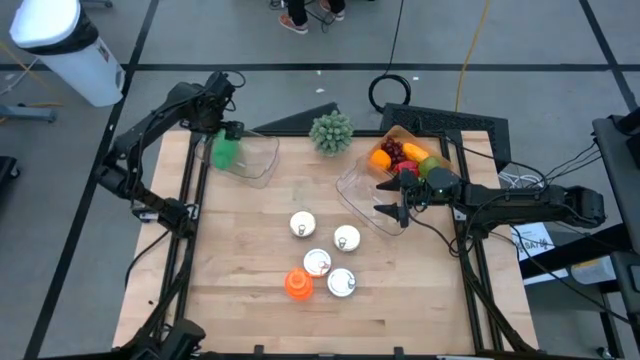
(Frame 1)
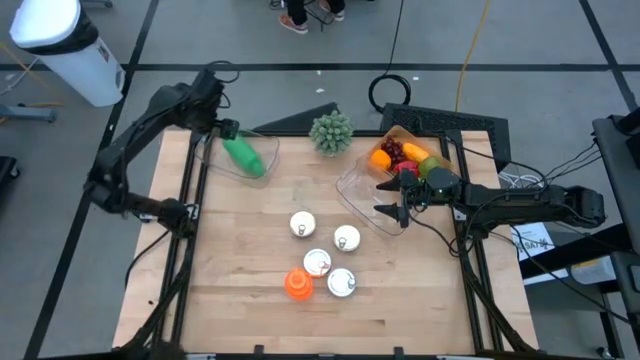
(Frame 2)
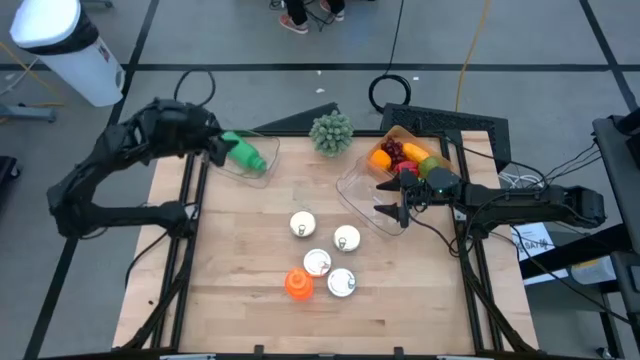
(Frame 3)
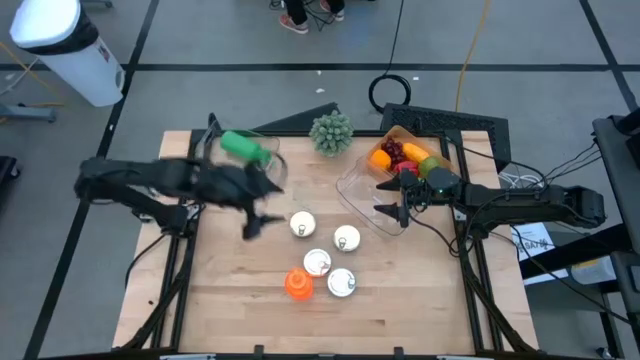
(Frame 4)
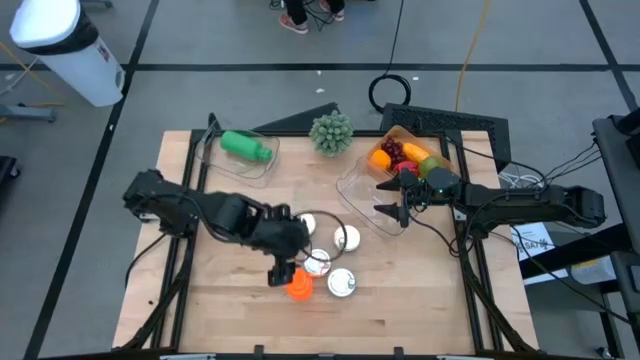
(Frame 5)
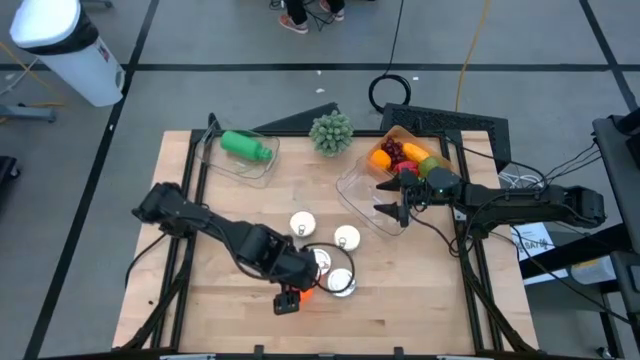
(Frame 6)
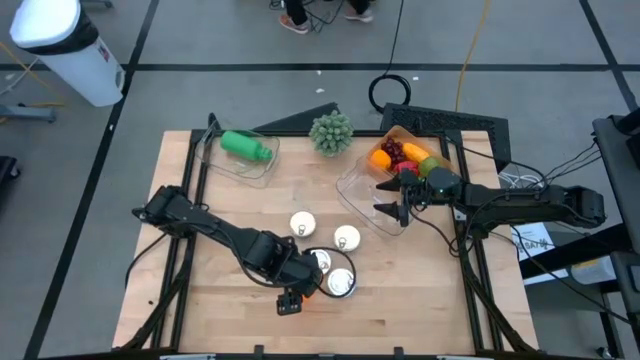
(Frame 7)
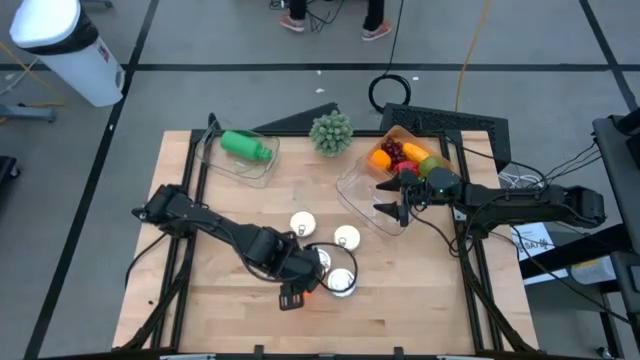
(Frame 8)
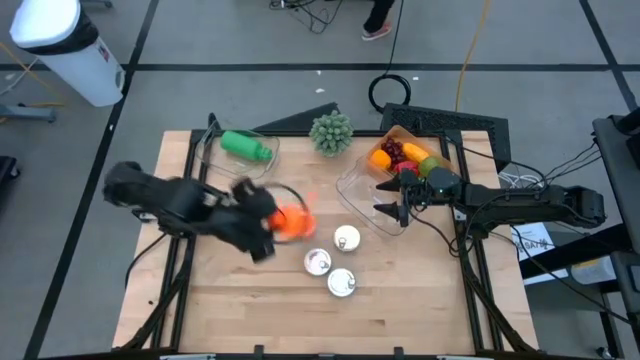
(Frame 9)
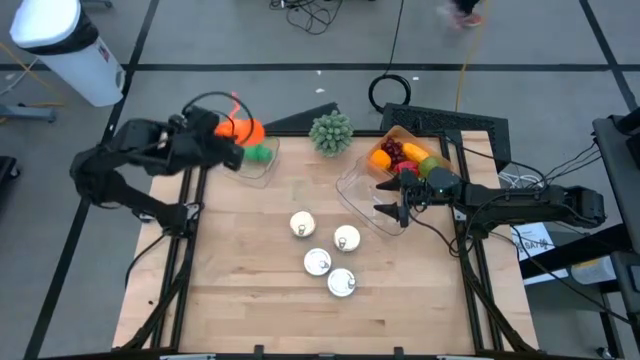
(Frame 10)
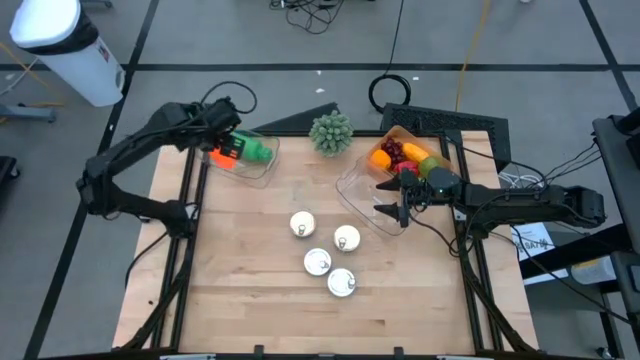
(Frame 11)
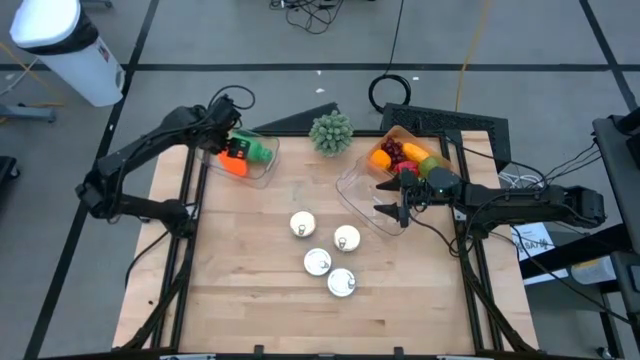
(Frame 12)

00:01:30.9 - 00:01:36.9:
Task: Pick & Place Food Item
Put the orange tumbler into the left transparent bin

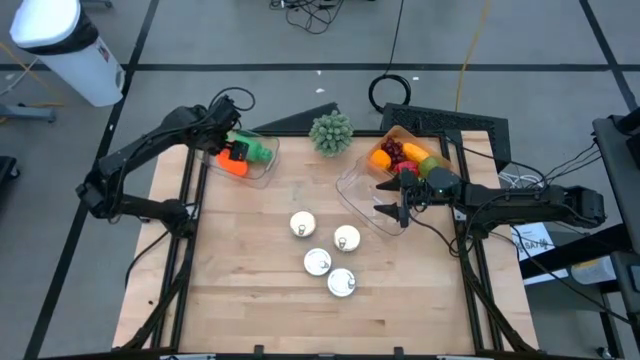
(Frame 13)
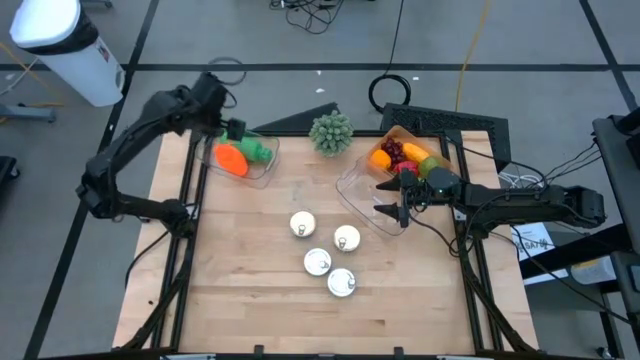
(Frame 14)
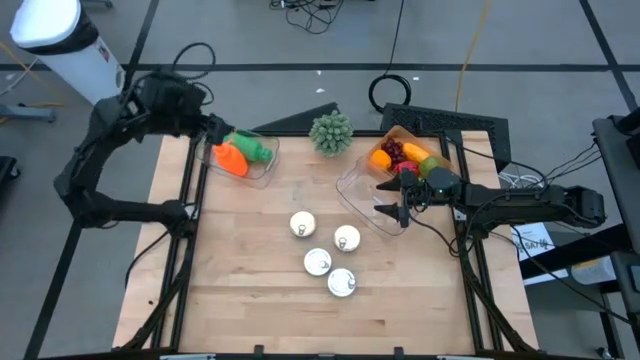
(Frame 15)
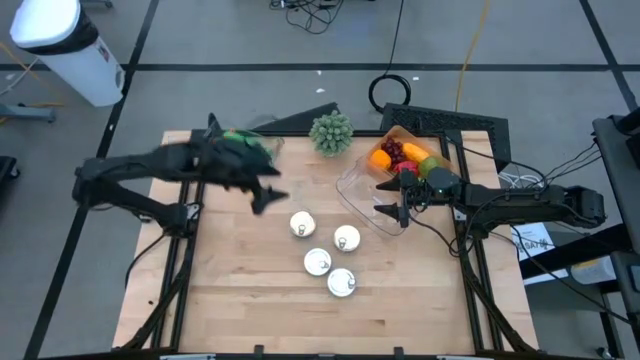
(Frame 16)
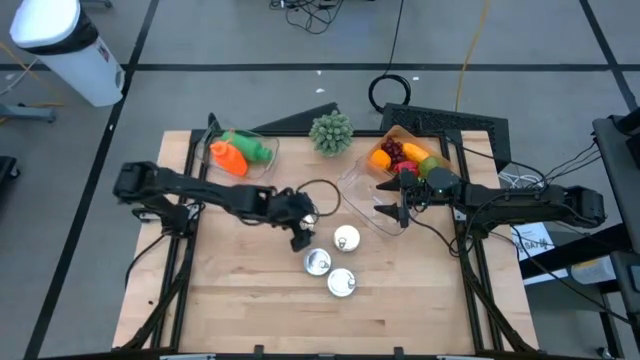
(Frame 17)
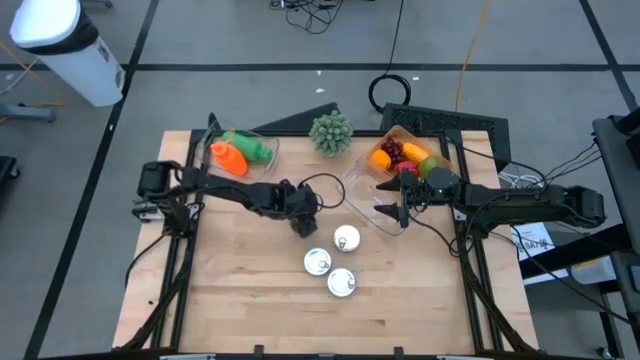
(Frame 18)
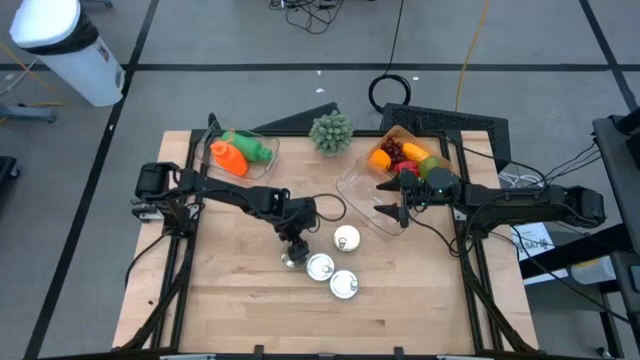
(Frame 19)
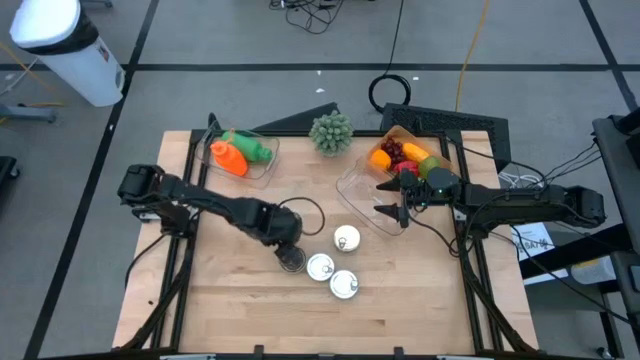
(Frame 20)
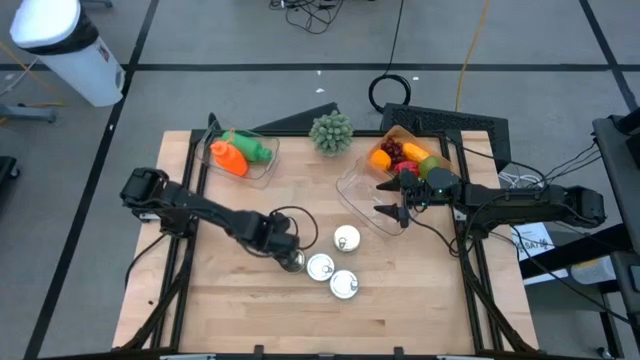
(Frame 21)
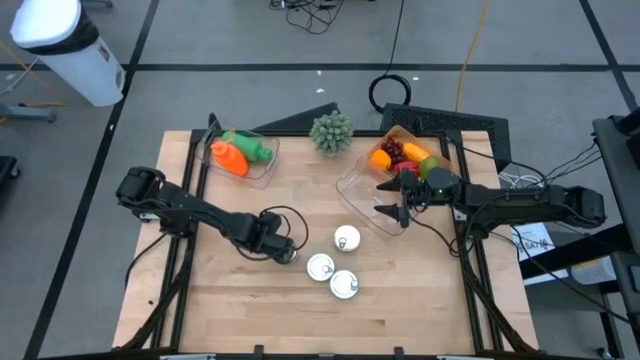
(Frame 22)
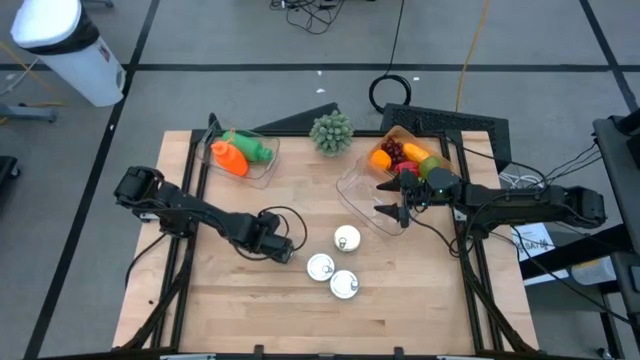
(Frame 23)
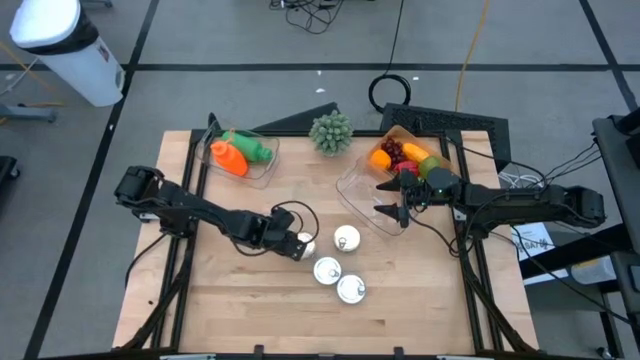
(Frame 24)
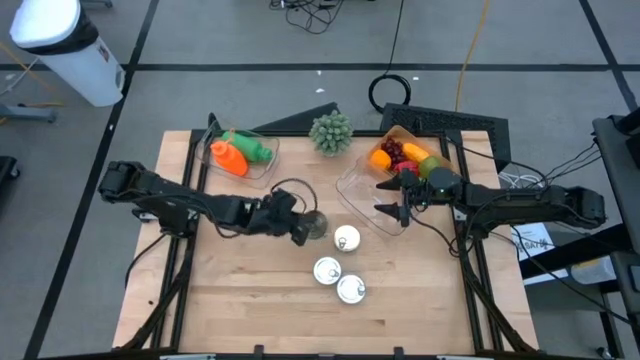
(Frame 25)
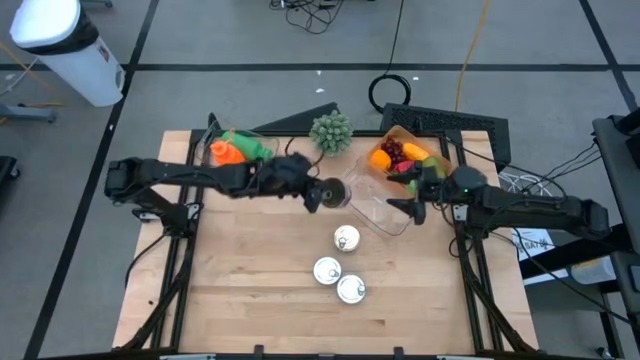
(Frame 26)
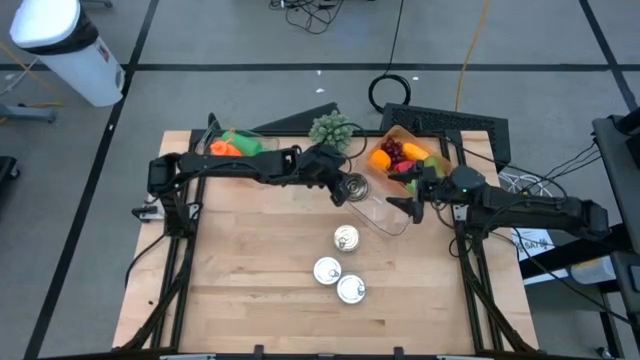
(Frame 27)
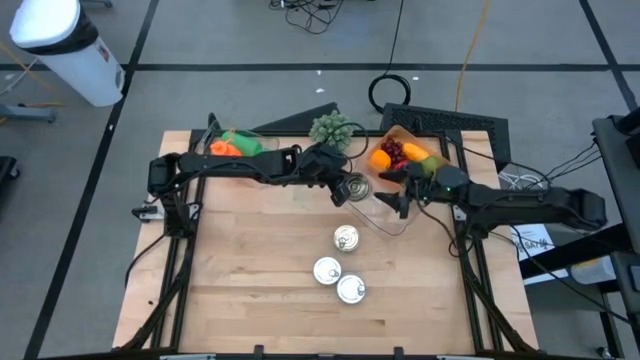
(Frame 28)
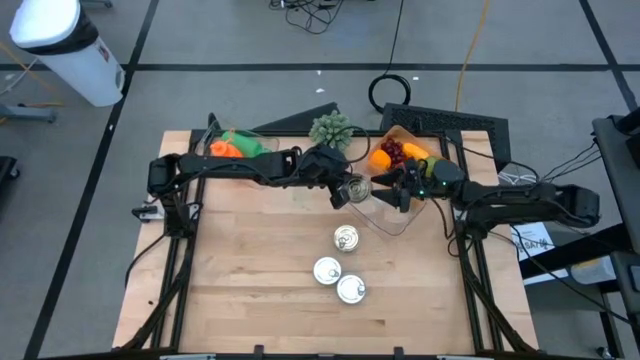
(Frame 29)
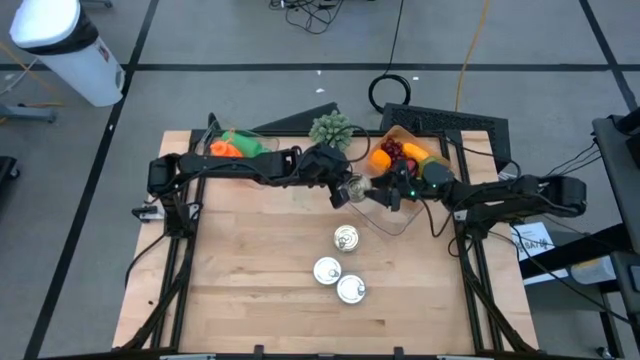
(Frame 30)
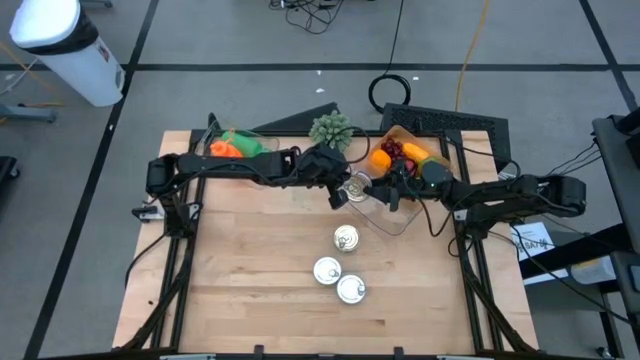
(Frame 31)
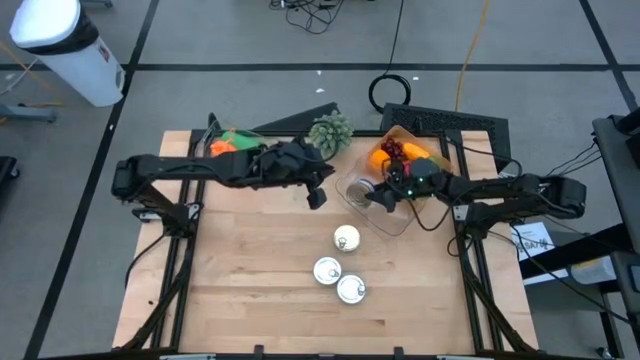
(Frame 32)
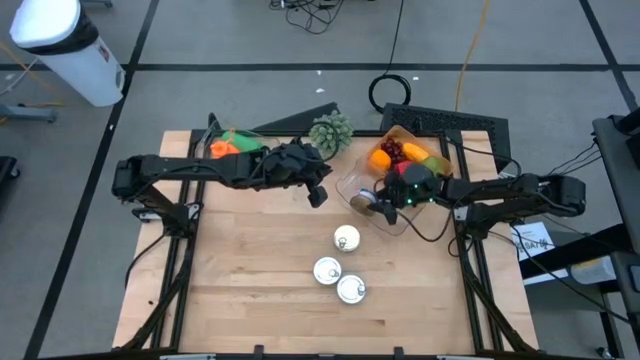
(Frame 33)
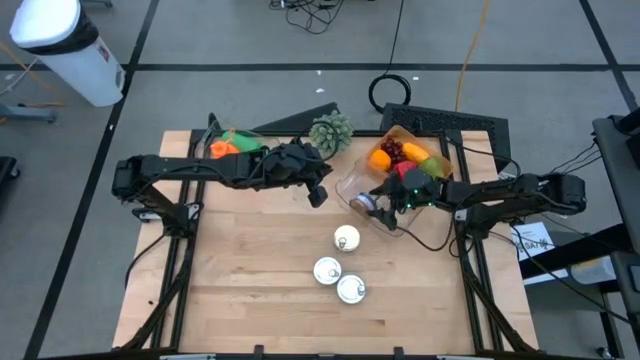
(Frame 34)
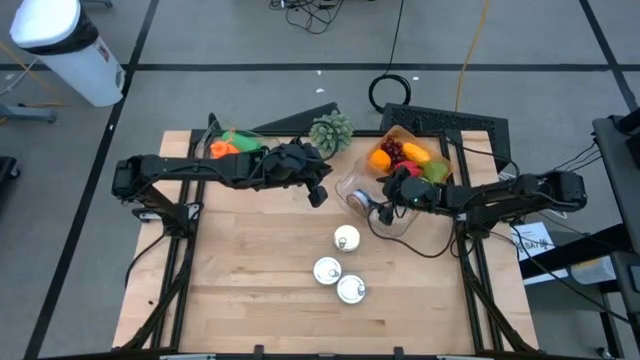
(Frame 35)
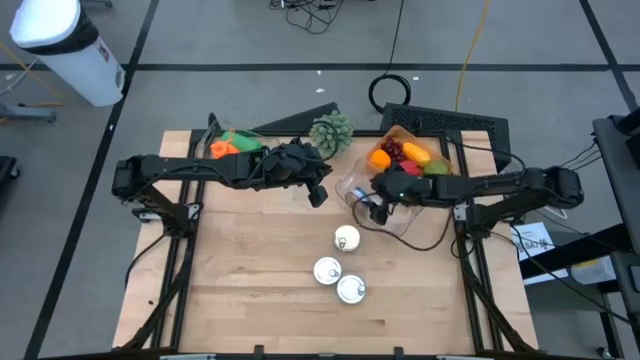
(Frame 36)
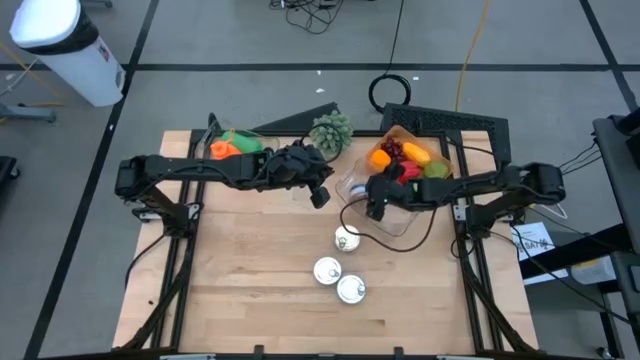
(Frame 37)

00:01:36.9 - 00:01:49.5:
Put the left blue and pink tuna can into the right transparent bin

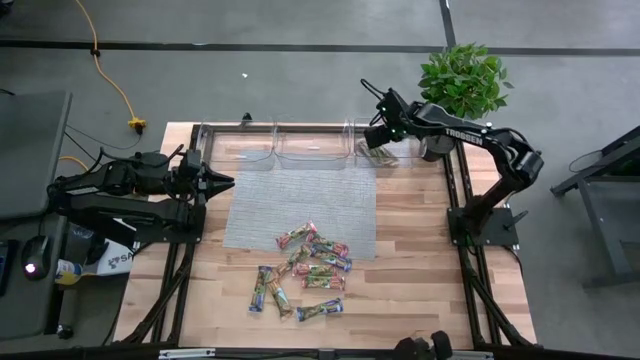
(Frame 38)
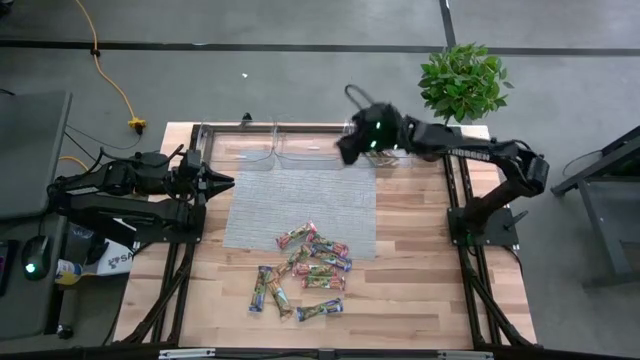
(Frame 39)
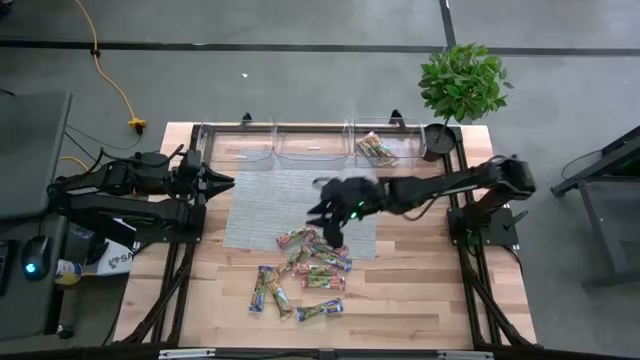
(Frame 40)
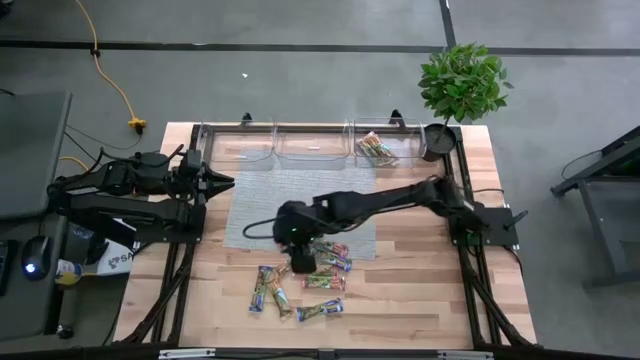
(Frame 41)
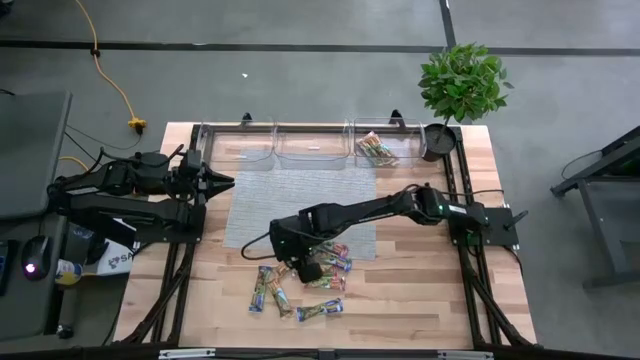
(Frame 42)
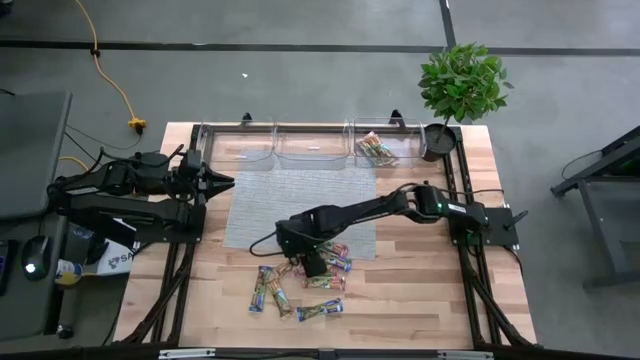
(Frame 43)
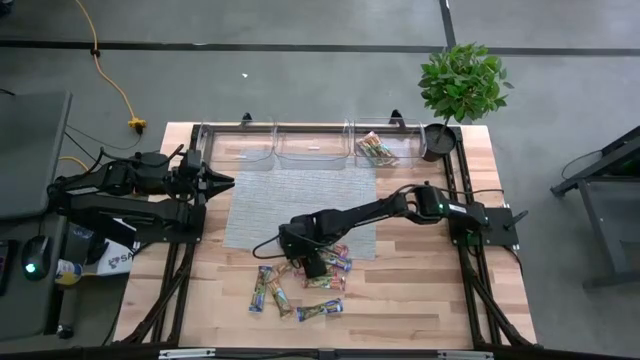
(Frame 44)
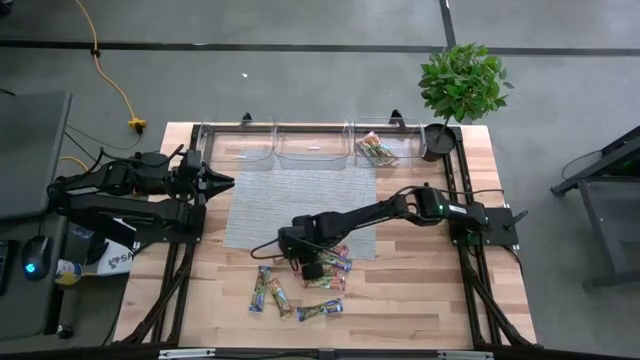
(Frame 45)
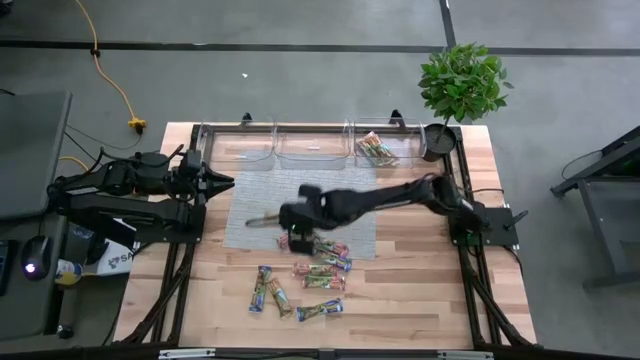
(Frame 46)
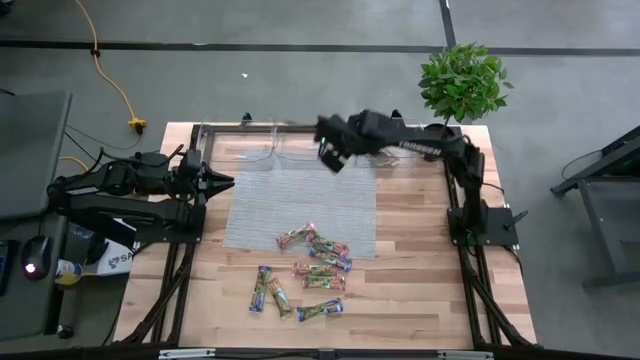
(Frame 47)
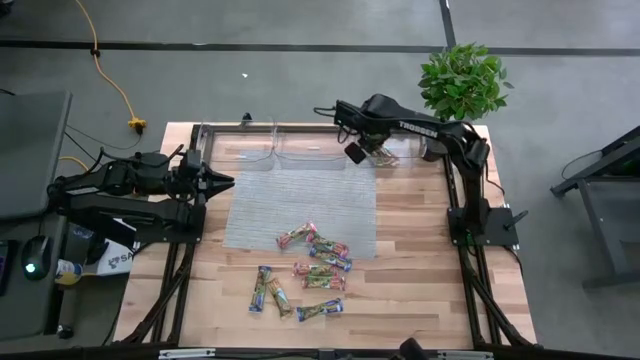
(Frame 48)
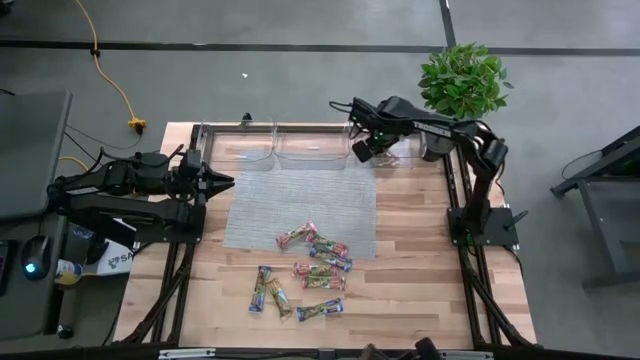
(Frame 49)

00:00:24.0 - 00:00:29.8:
Task: Pick and place Granola Bars by type
Put the yellow granola bar into the right transparent bin
